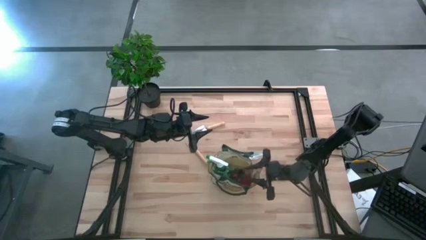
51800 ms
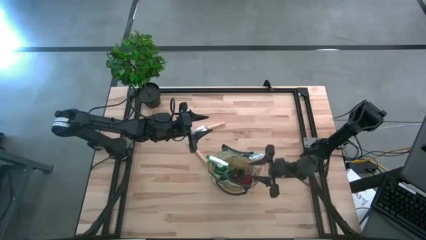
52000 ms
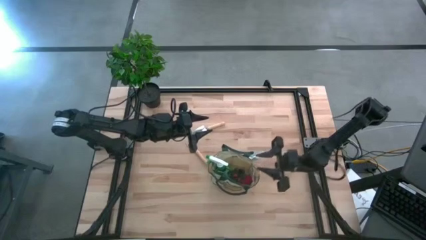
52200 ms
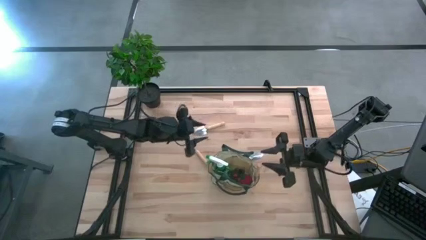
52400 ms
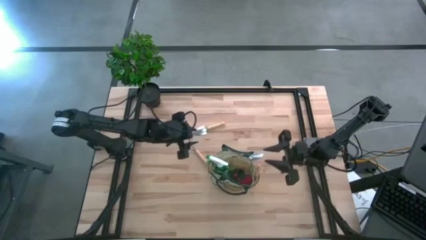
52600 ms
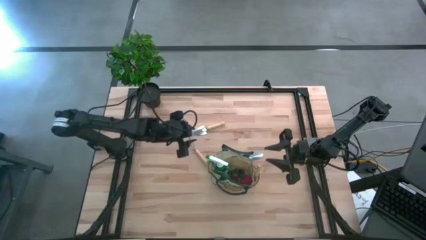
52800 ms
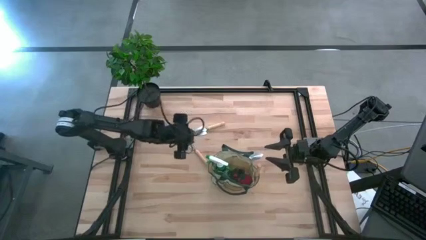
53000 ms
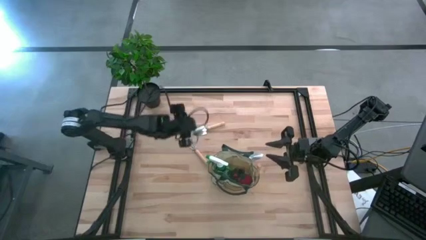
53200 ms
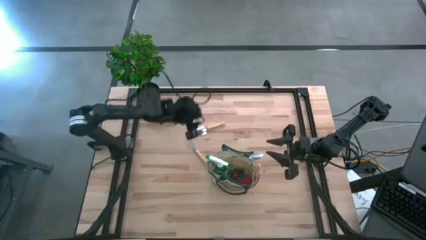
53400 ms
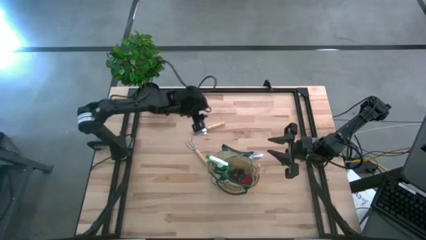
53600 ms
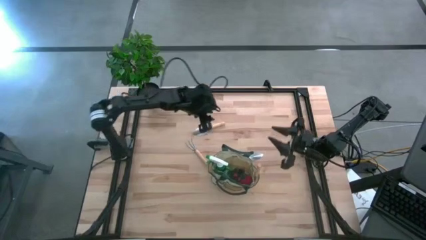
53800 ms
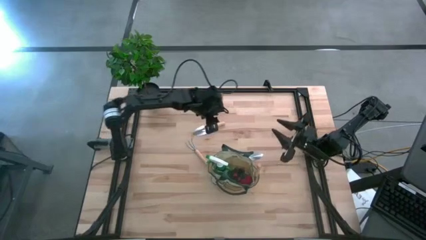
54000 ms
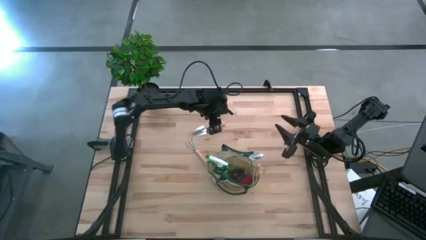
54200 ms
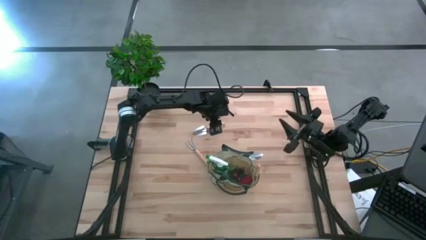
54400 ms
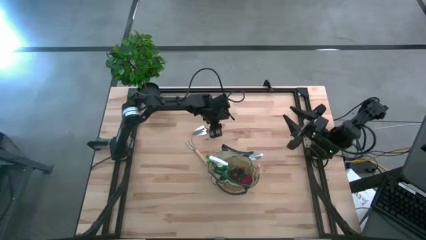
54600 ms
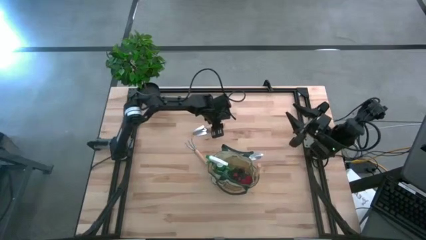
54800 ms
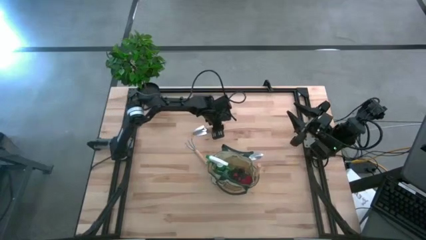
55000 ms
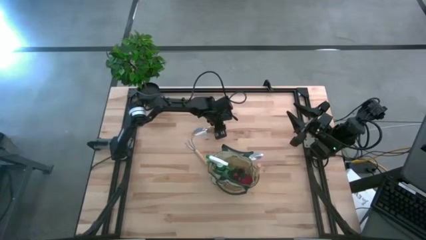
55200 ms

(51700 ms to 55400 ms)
Task: Pick & Place Garden tools in Gardening bag
Put the top trowel into the gardening bag

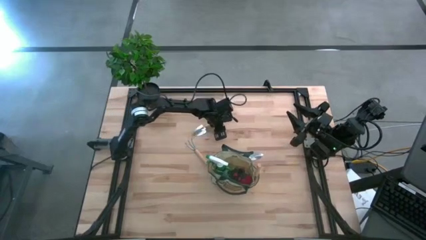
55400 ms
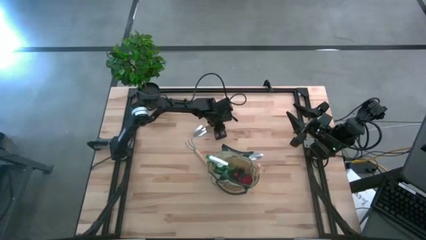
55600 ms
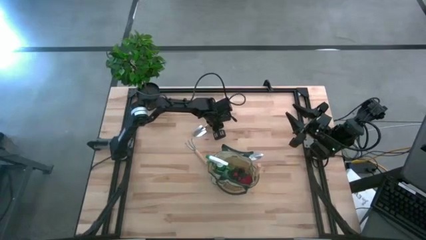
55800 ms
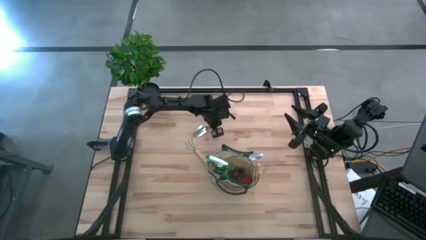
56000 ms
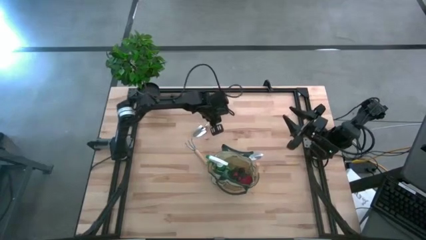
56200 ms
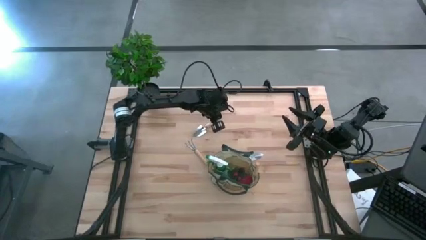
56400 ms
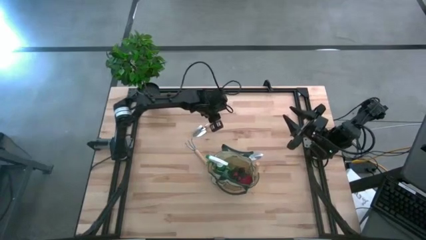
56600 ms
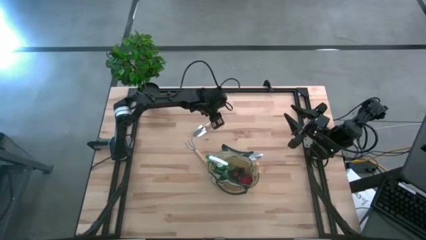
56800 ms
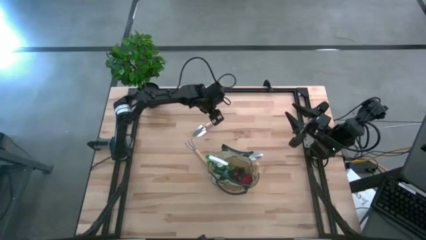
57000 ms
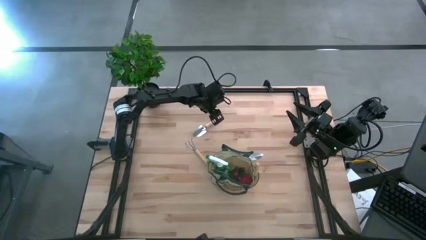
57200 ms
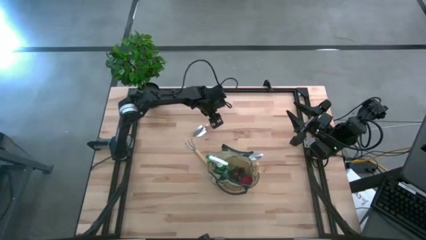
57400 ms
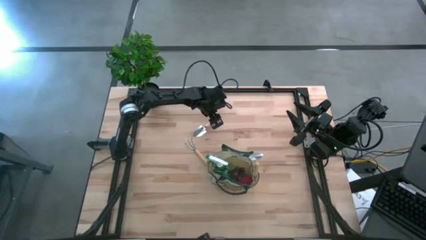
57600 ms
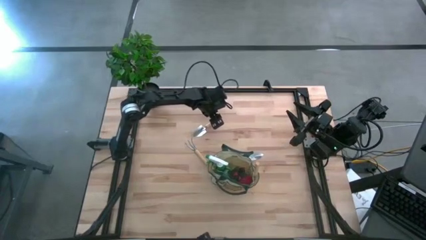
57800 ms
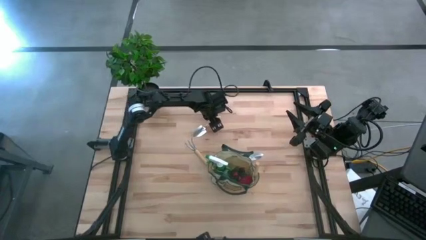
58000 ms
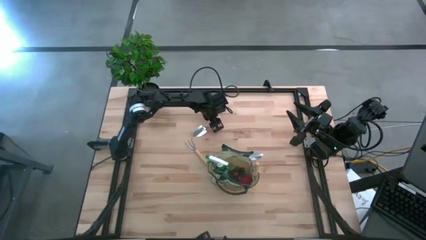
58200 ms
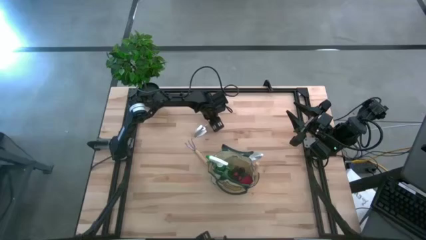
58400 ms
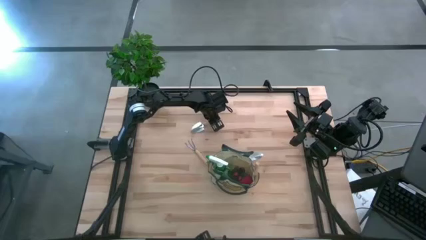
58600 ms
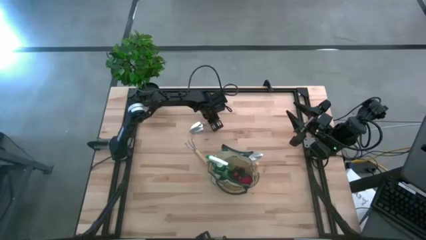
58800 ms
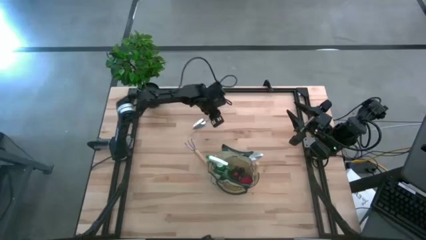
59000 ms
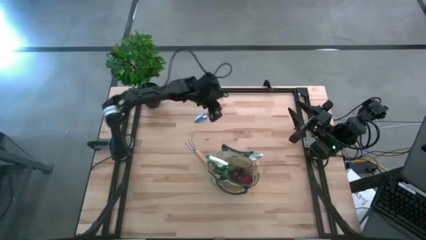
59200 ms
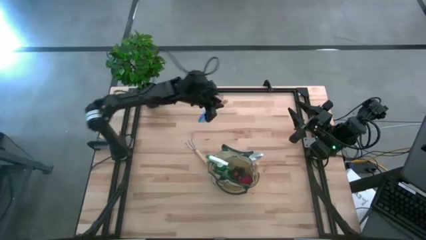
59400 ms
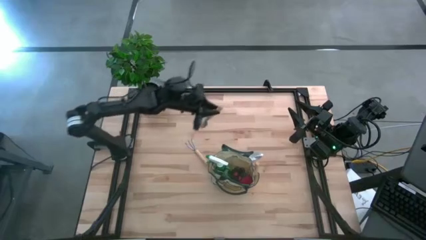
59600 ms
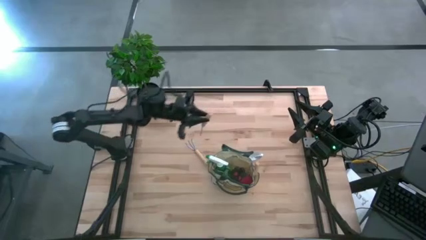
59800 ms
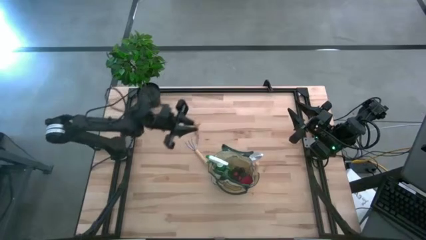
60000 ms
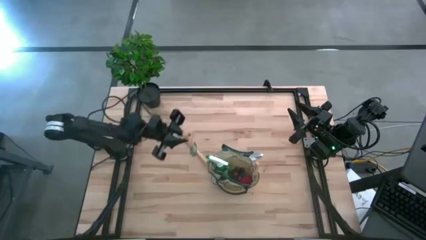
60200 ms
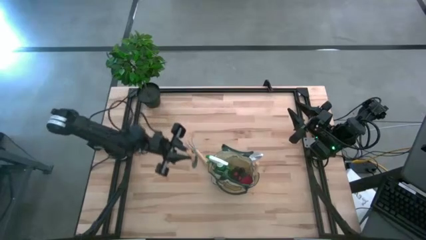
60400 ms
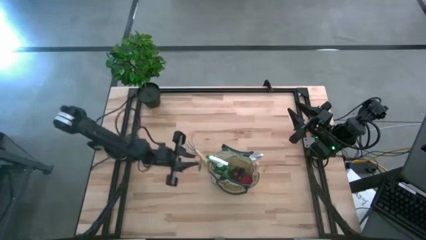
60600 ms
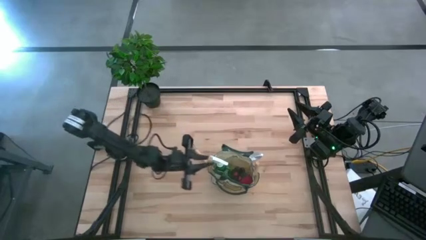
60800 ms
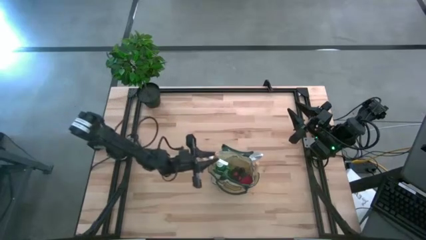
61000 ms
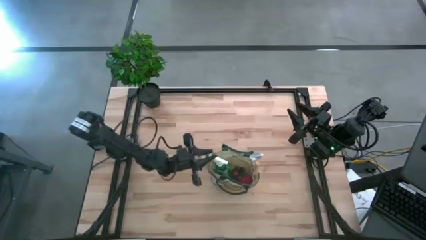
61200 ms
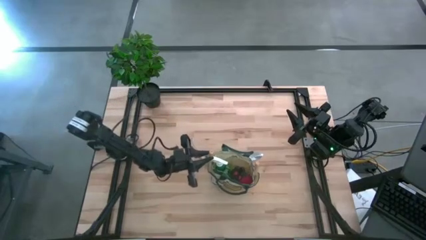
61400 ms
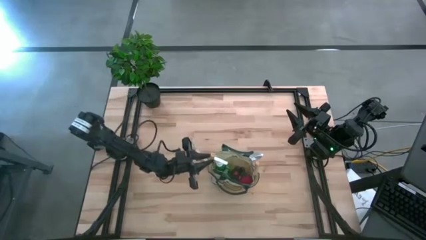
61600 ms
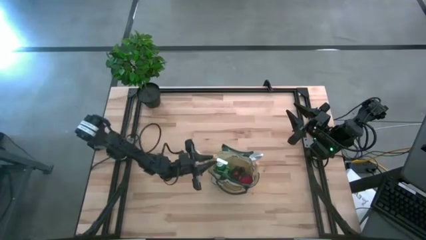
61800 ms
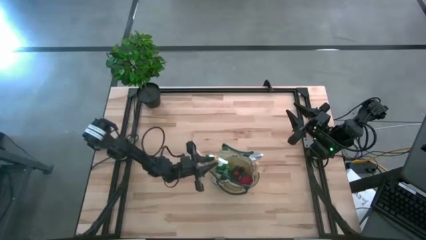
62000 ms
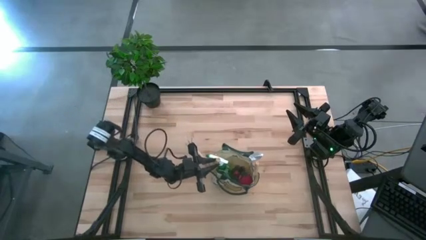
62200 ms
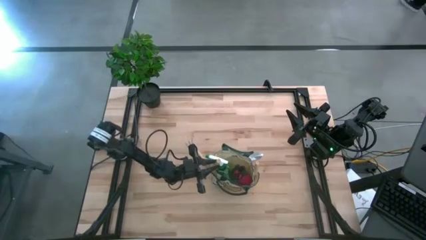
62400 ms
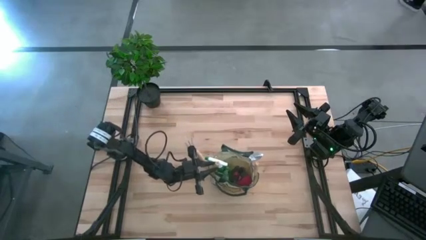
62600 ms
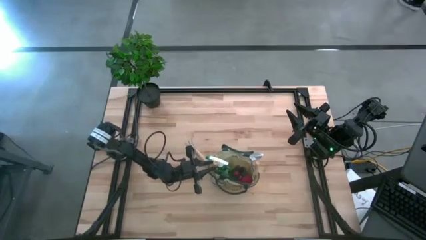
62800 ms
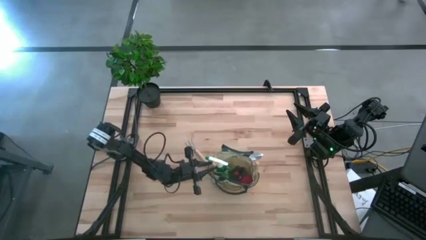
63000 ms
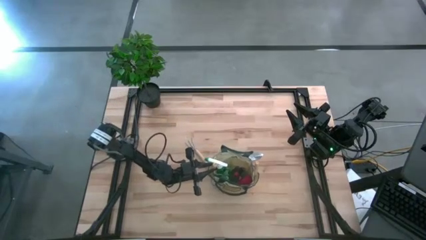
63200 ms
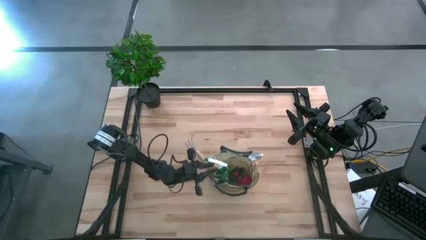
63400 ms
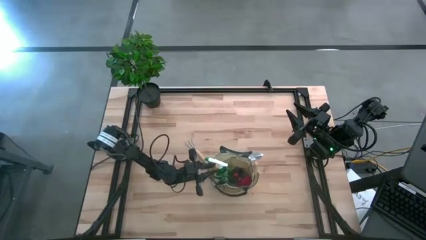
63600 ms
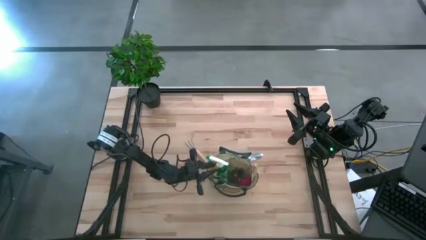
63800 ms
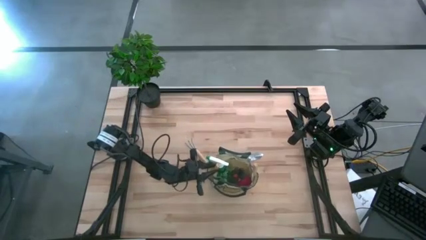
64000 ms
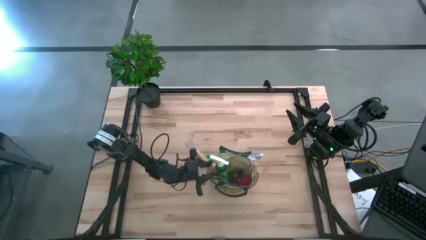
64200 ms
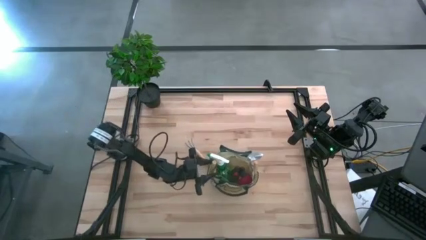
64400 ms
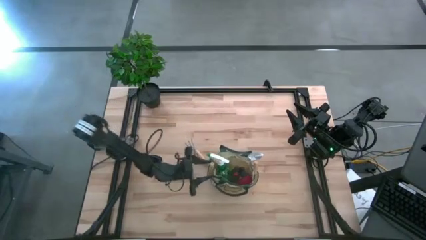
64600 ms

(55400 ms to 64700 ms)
Put the top trowel into the gardening bag
